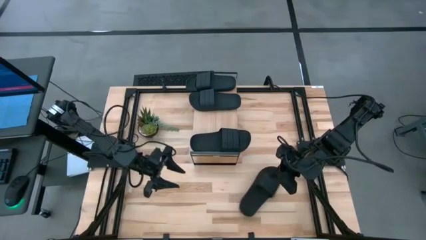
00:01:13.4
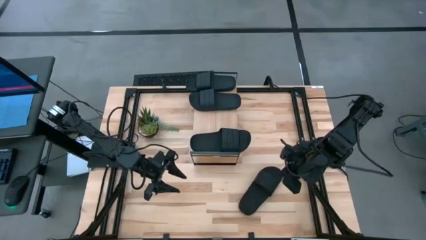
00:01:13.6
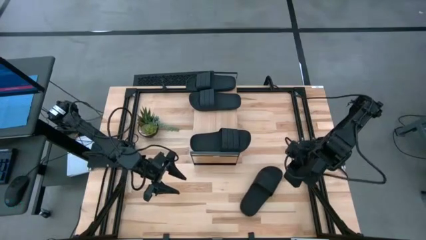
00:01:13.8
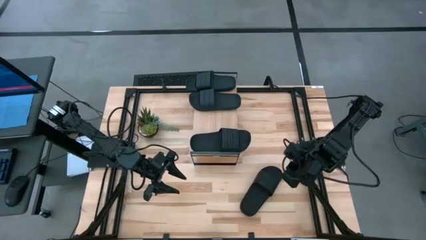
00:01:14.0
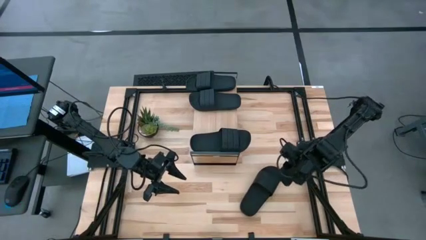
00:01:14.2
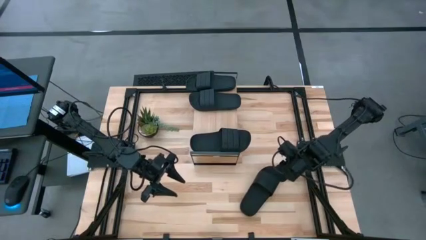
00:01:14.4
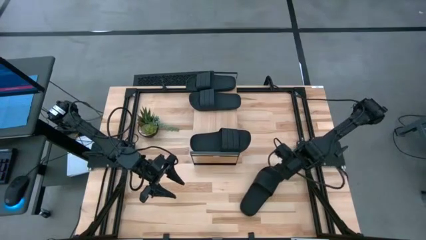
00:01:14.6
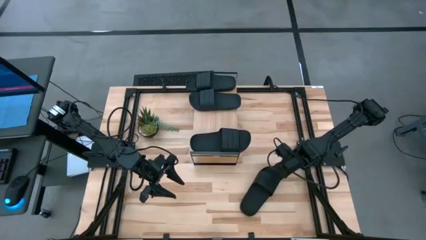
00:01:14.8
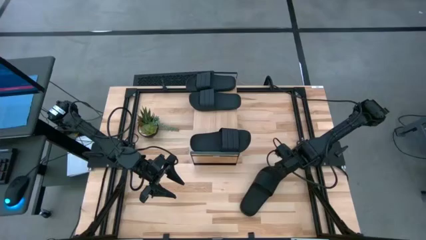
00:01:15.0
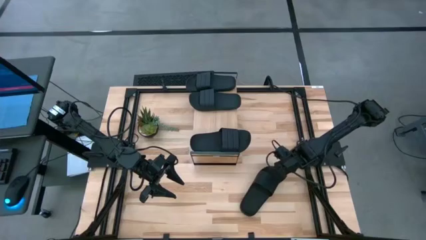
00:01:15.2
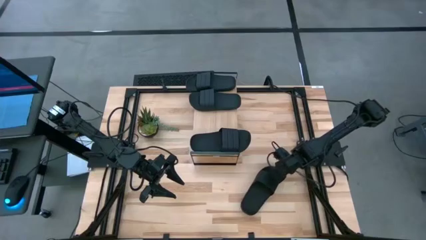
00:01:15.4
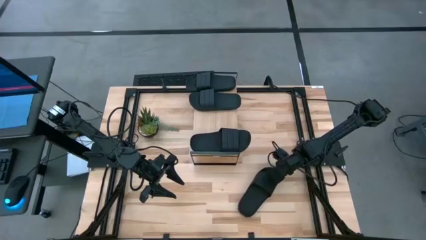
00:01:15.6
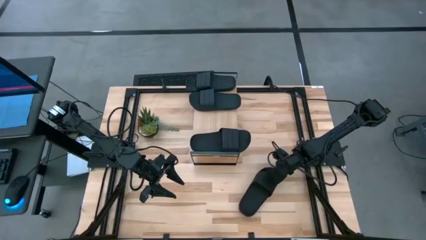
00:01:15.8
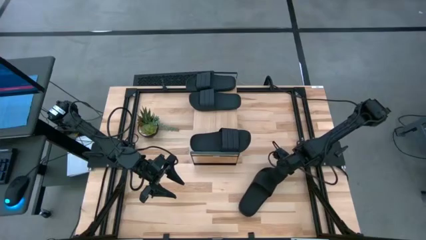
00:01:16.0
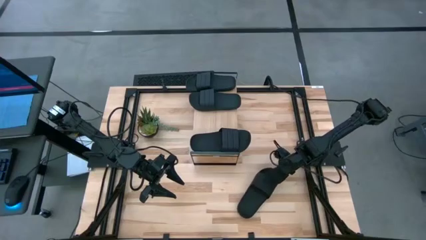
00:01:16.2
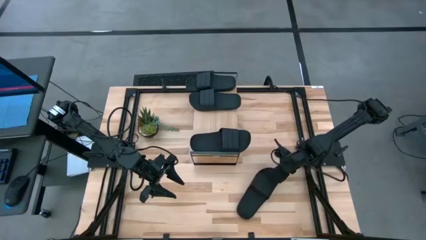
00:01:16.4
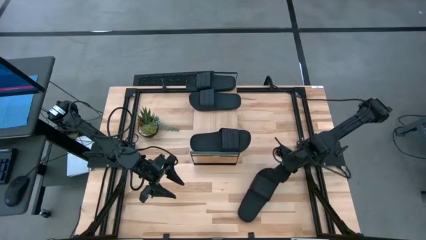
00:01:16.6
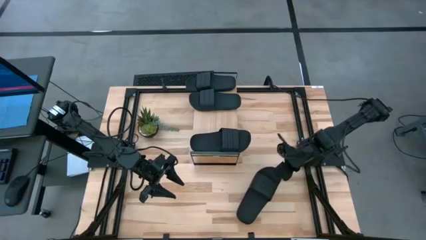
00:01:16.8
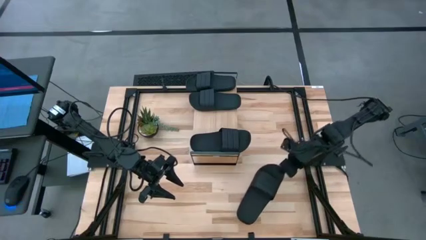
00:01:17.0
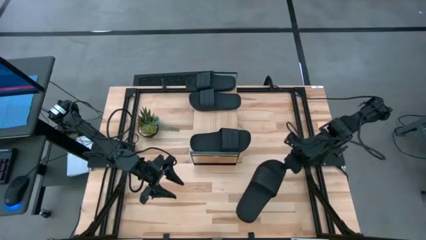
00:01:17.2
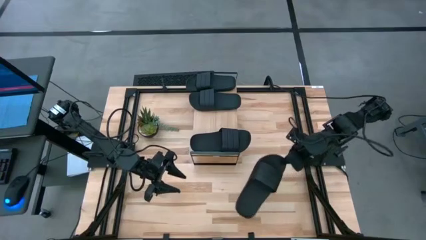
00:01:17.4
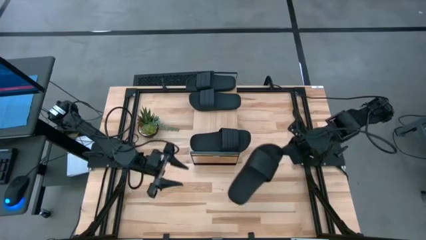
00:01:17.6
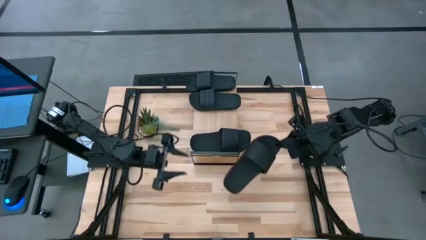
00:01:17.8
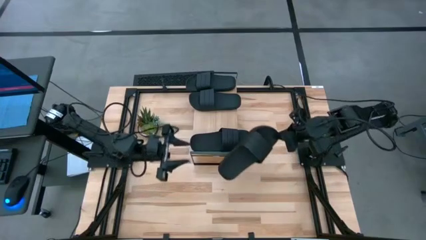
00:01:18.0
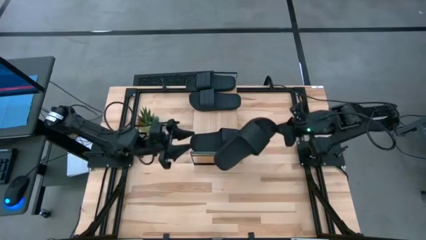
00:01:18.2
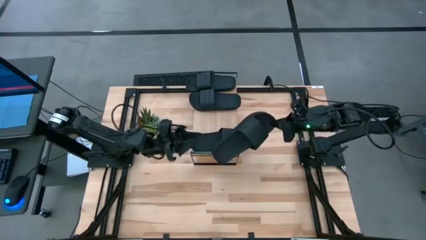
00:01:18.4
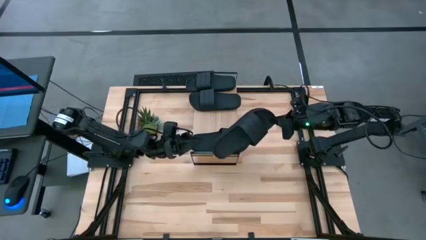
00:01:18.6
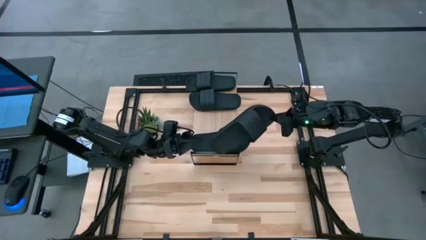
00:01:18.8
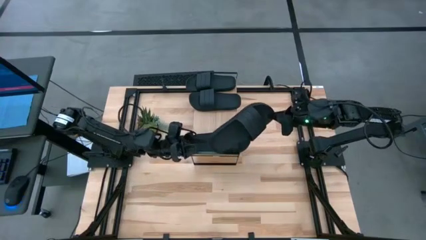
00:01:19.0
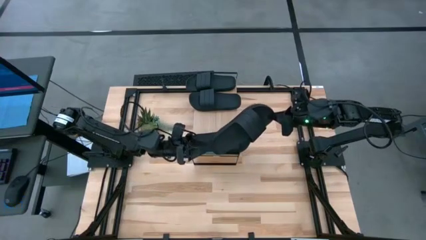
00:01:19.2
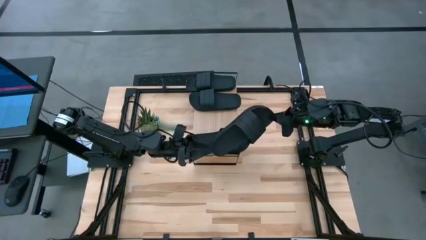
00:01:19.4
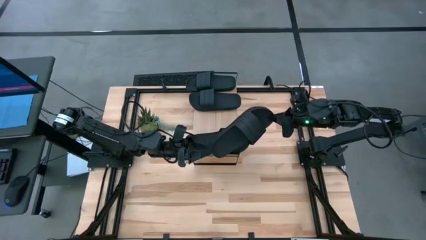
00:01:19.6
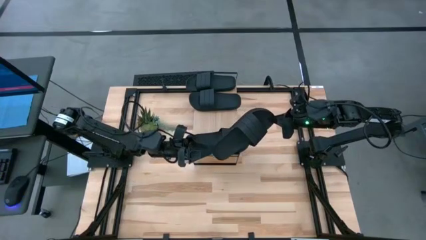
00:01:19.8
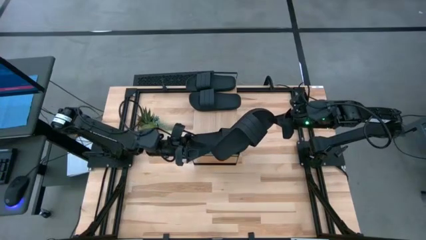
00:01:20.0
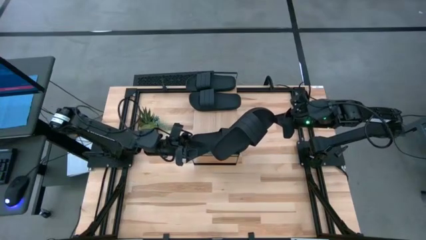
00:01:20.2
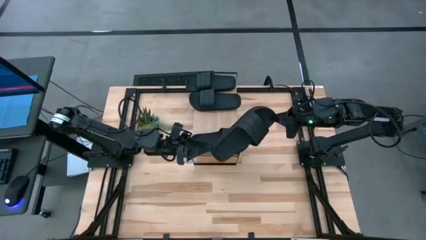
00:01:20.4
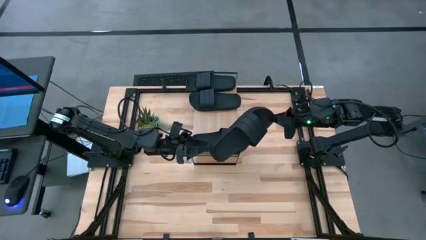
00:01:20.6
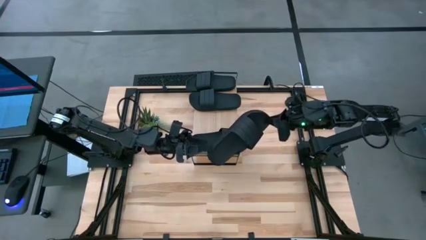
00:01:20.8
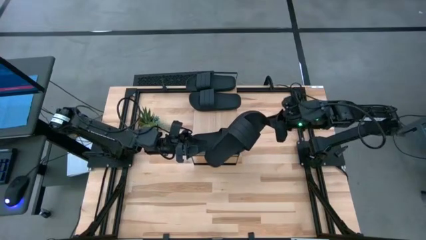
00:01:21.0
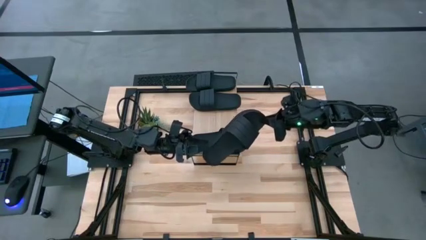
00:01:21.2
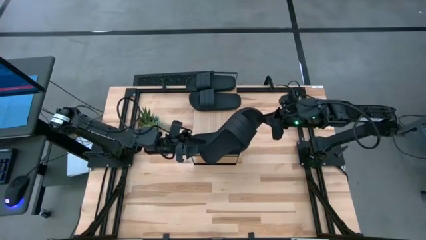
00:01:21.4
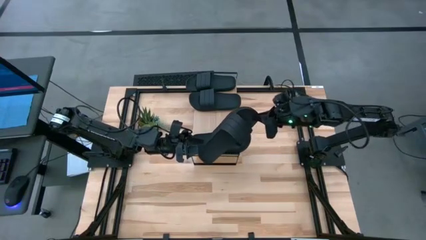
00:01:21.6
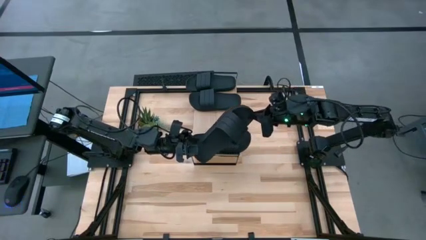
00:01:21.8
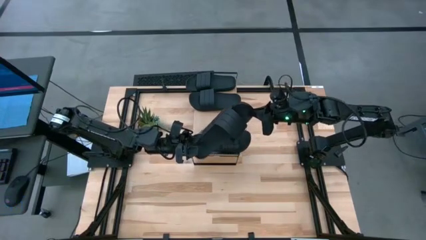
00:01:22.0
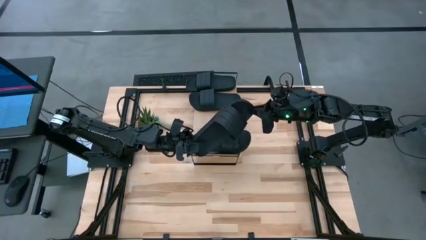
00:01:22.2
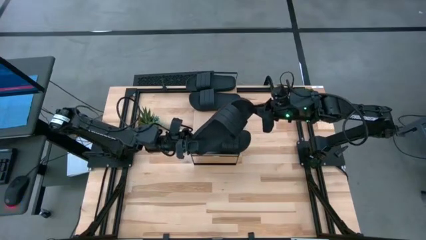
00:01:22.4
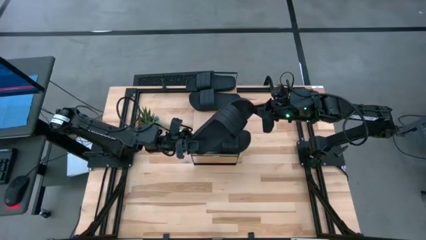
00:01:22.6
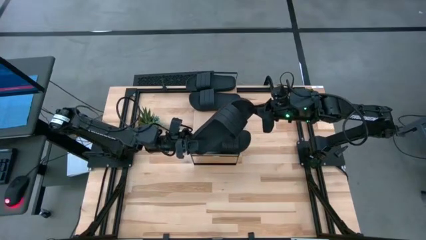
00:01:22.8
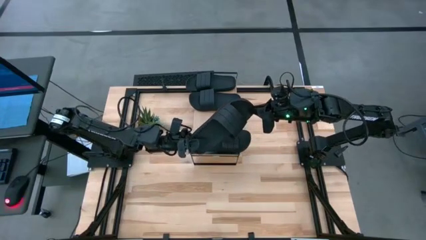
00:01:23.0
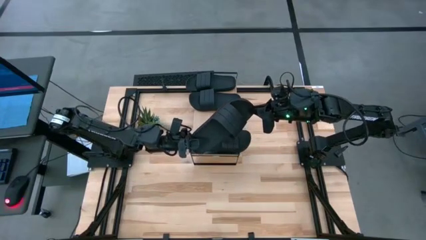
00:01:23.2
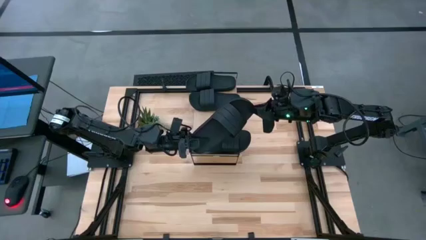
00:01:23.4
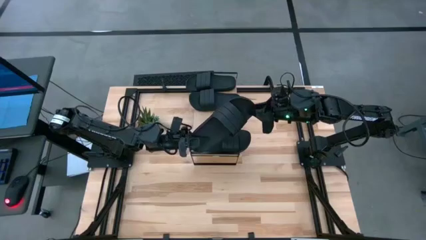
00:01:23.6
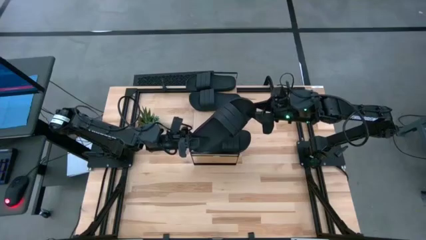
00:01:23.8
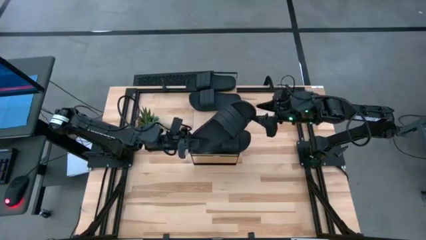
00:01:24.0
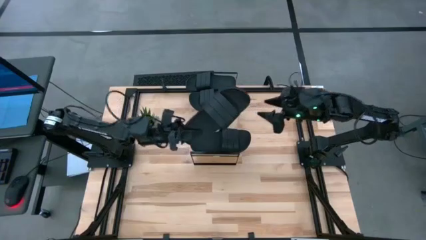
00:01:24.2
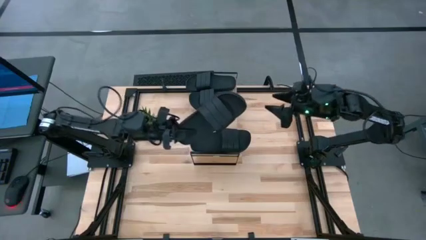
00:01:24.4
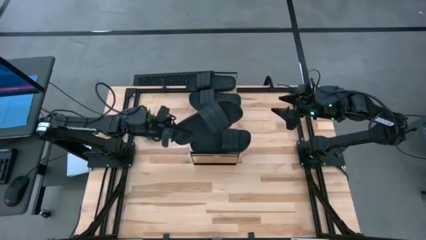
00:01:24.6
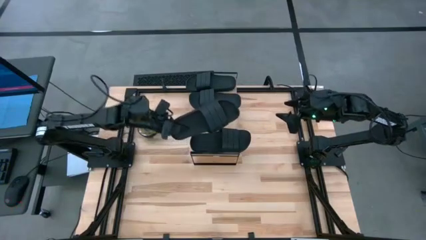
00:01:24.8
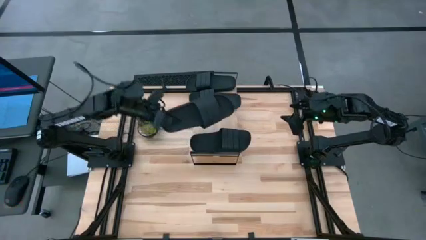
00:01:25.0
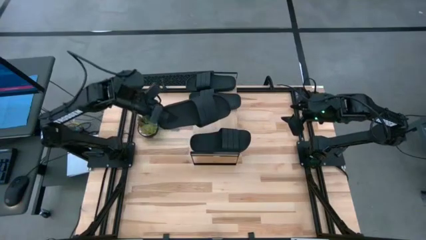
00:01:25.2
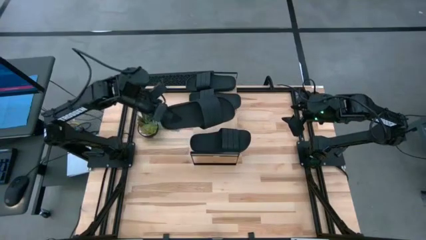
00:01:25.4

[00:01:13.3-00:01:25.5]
Task: Pick and place slides into the shelf
Put the black slide on the shelf
